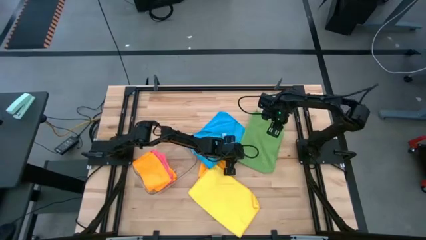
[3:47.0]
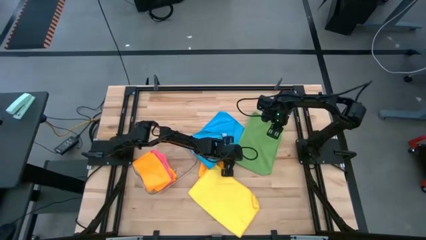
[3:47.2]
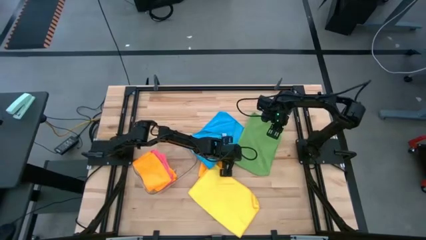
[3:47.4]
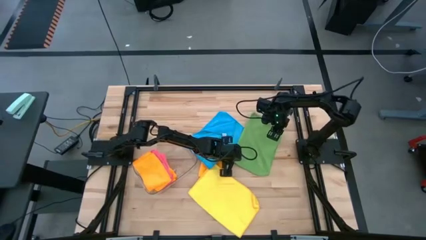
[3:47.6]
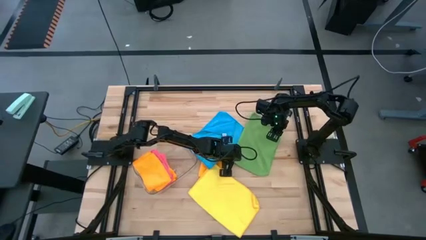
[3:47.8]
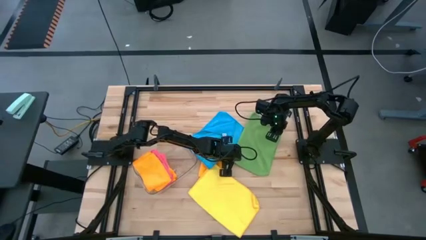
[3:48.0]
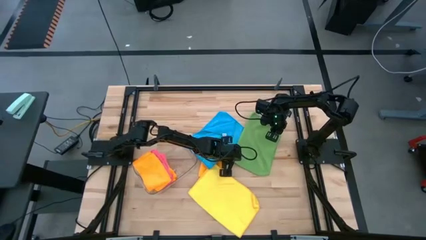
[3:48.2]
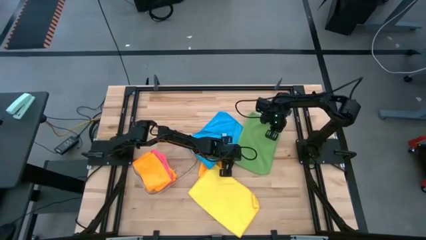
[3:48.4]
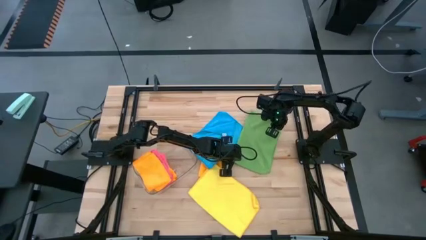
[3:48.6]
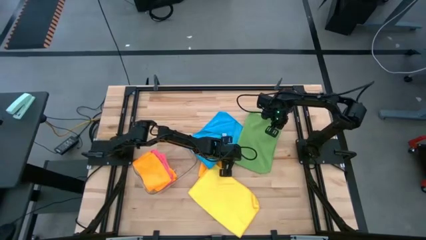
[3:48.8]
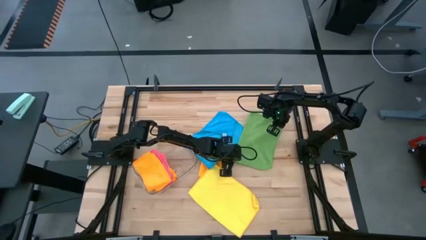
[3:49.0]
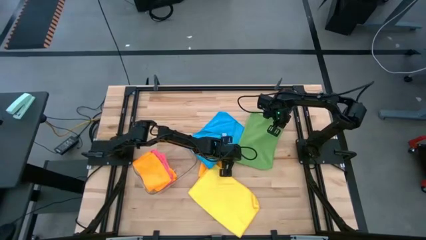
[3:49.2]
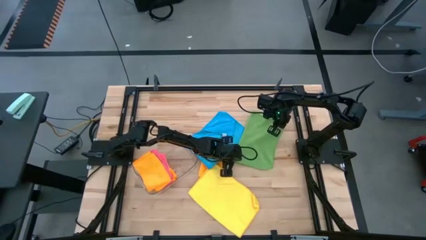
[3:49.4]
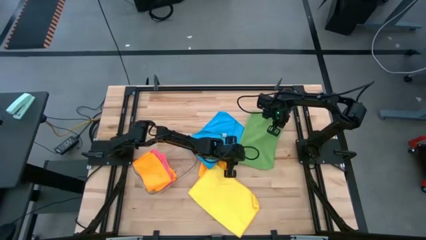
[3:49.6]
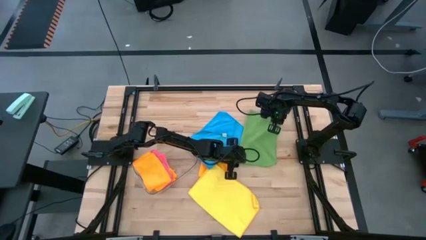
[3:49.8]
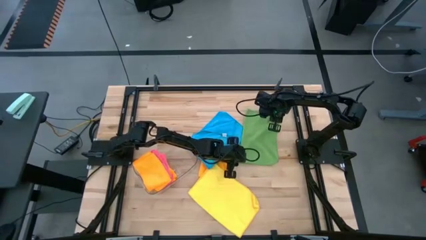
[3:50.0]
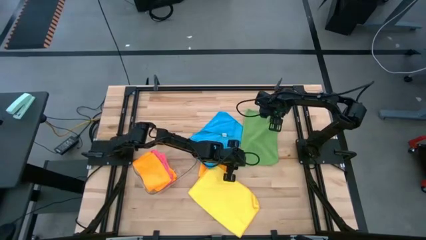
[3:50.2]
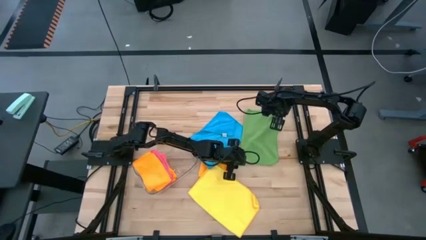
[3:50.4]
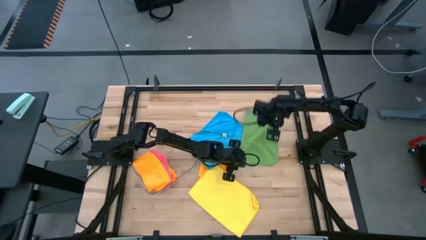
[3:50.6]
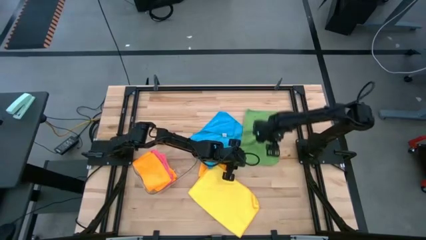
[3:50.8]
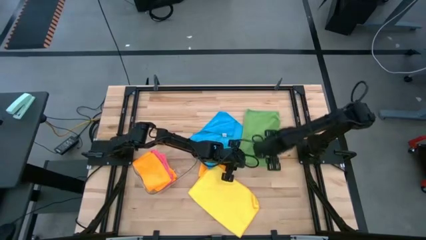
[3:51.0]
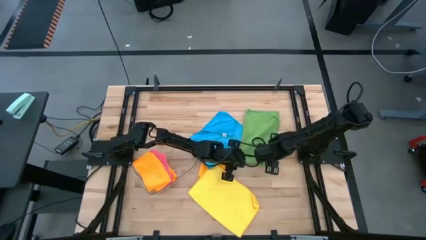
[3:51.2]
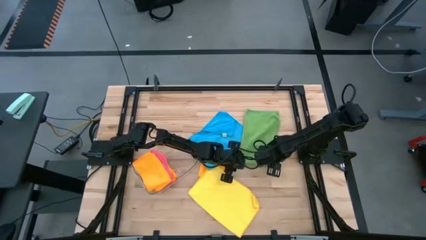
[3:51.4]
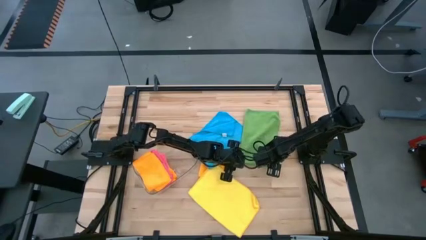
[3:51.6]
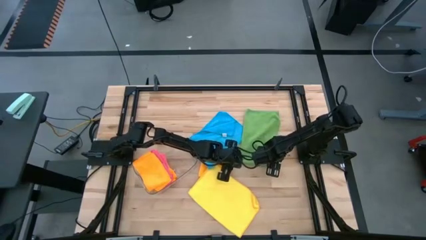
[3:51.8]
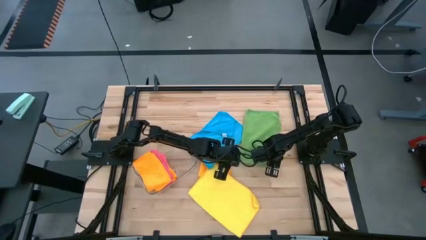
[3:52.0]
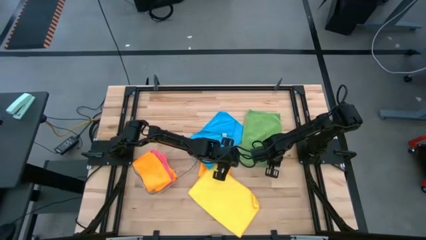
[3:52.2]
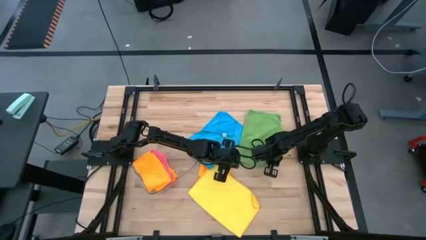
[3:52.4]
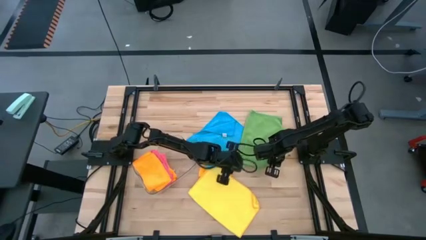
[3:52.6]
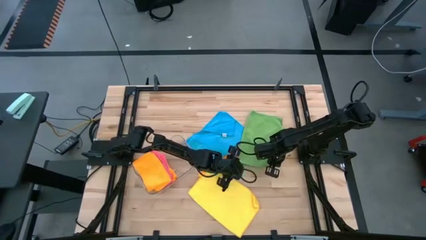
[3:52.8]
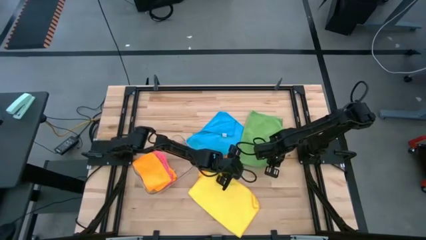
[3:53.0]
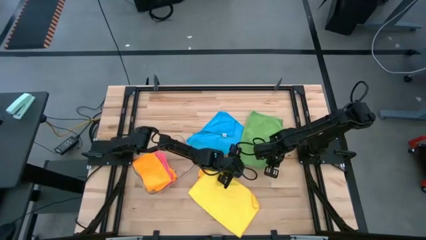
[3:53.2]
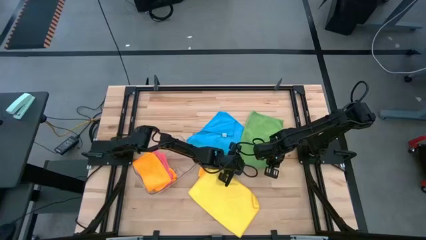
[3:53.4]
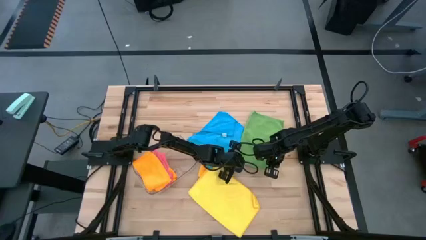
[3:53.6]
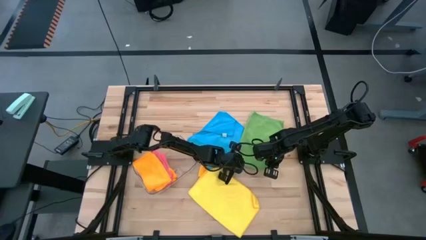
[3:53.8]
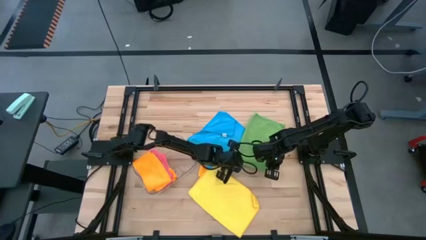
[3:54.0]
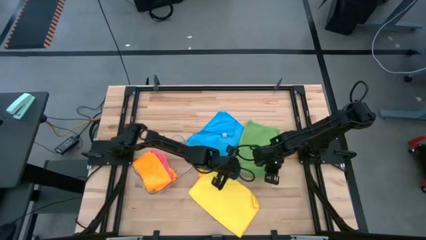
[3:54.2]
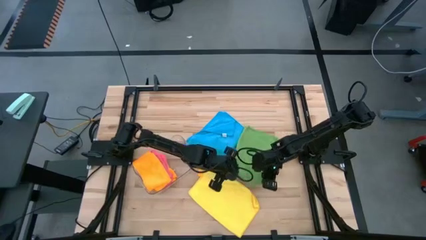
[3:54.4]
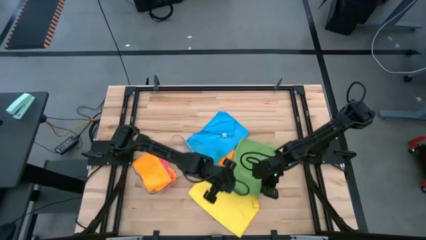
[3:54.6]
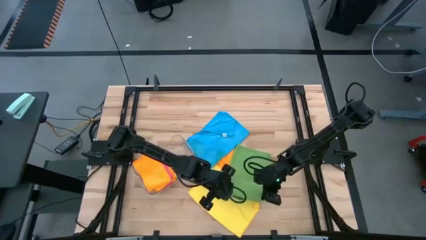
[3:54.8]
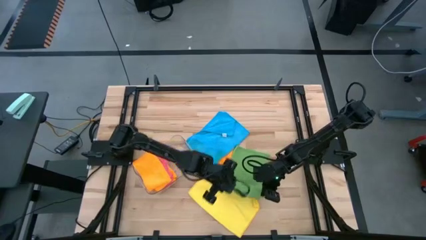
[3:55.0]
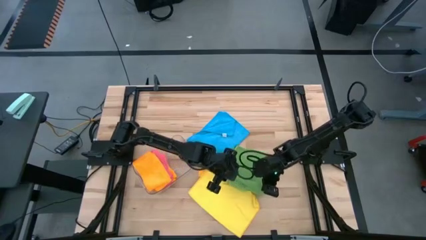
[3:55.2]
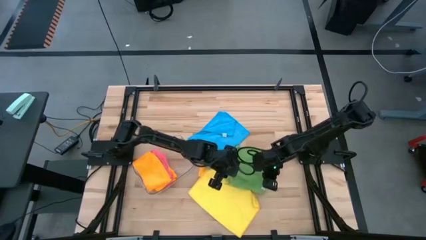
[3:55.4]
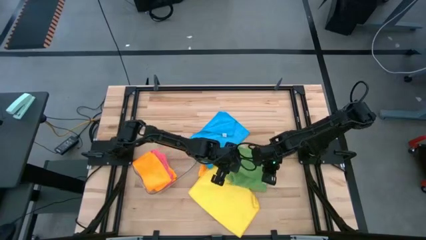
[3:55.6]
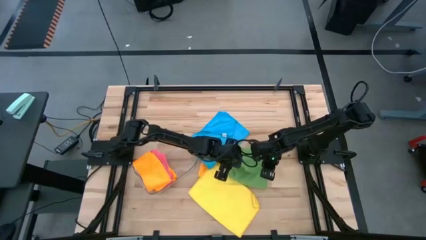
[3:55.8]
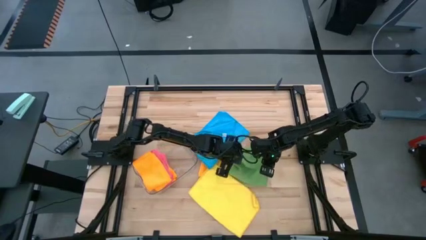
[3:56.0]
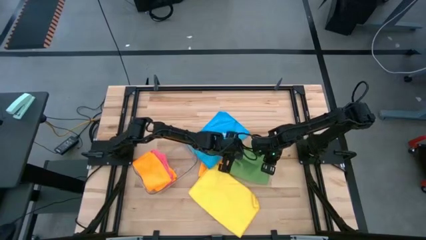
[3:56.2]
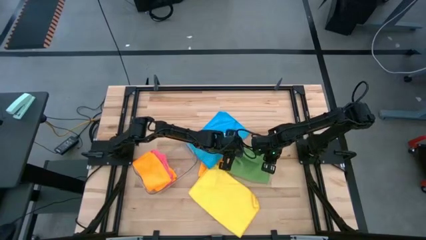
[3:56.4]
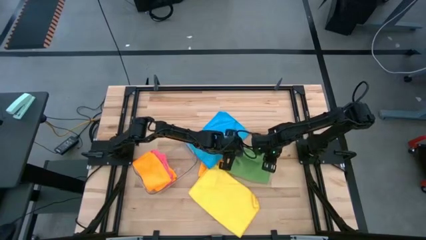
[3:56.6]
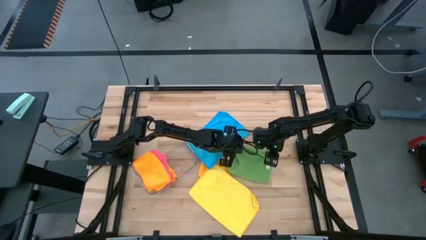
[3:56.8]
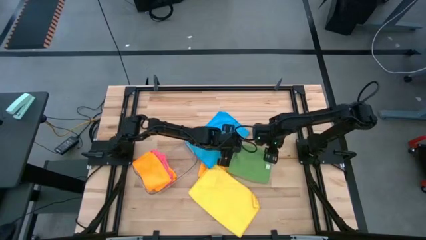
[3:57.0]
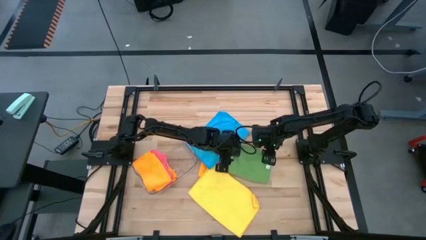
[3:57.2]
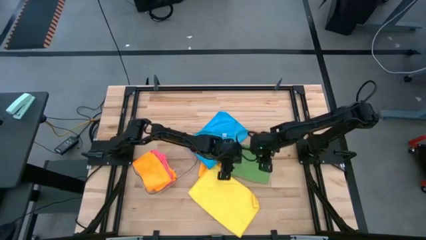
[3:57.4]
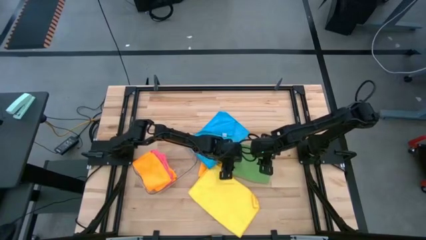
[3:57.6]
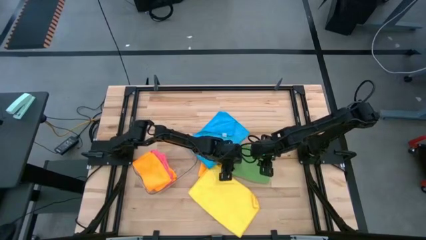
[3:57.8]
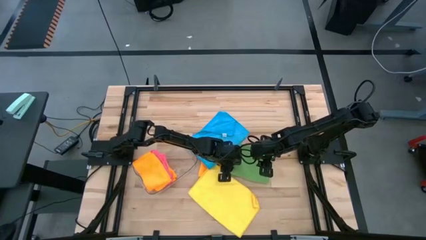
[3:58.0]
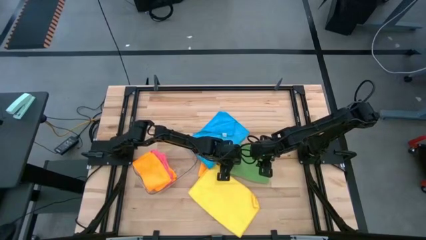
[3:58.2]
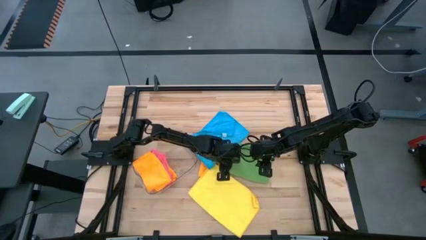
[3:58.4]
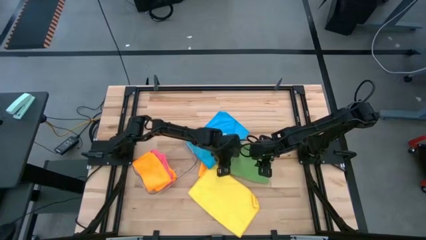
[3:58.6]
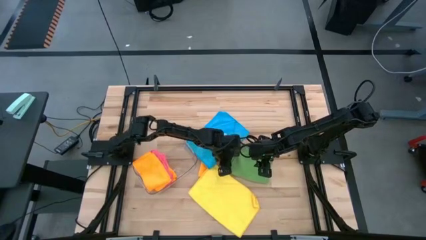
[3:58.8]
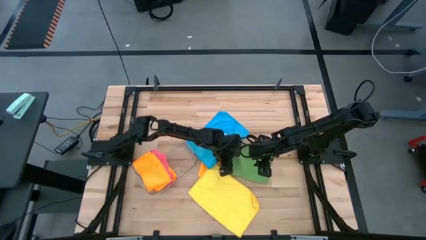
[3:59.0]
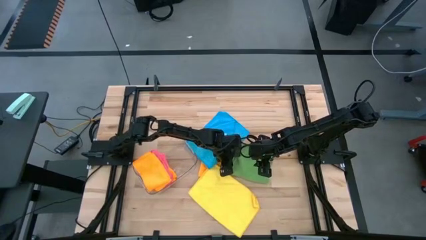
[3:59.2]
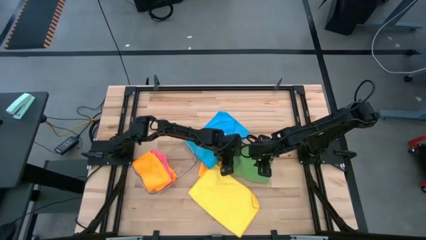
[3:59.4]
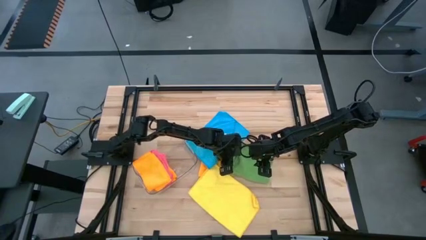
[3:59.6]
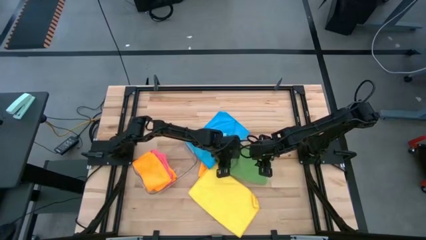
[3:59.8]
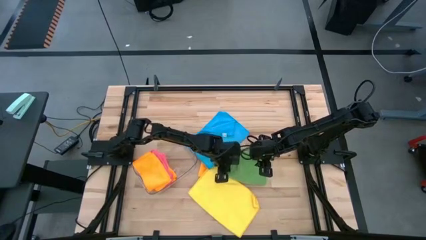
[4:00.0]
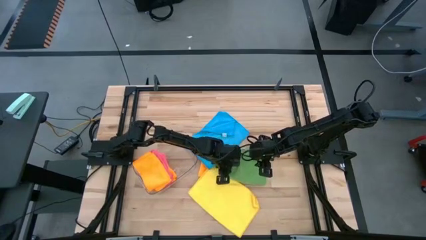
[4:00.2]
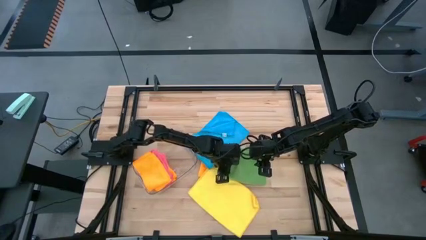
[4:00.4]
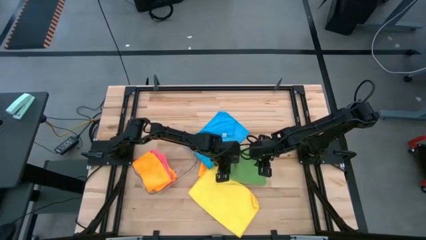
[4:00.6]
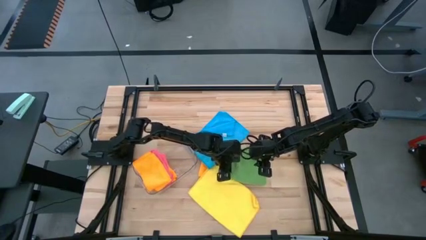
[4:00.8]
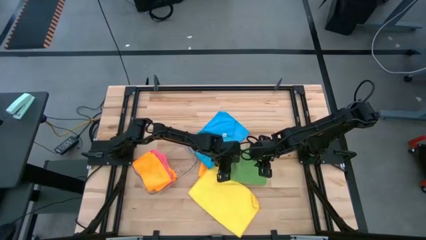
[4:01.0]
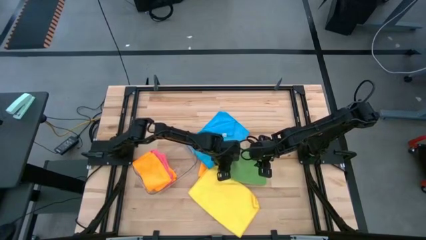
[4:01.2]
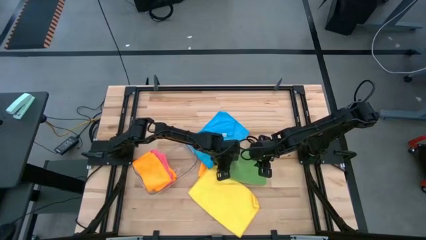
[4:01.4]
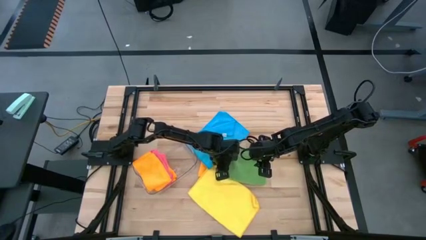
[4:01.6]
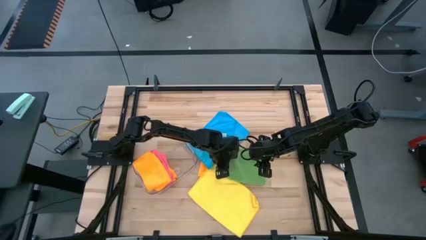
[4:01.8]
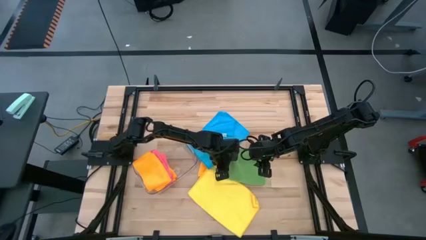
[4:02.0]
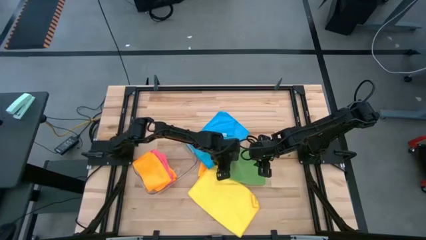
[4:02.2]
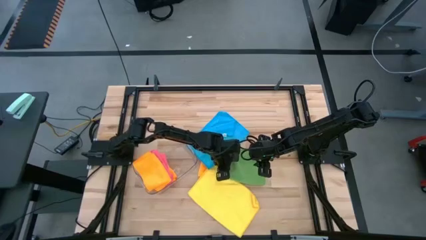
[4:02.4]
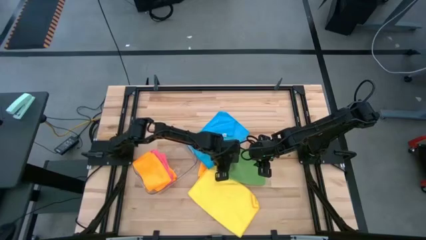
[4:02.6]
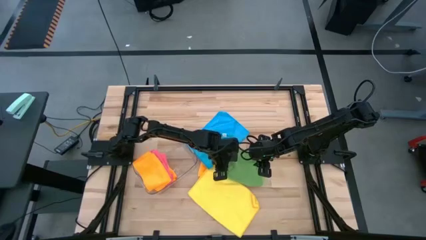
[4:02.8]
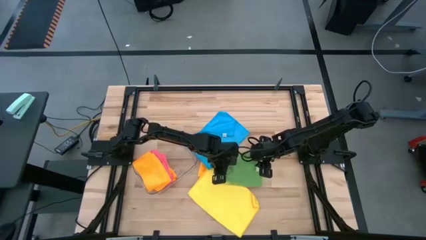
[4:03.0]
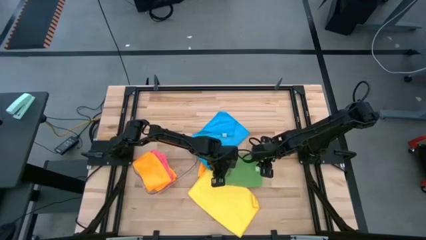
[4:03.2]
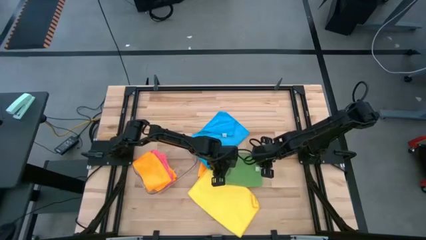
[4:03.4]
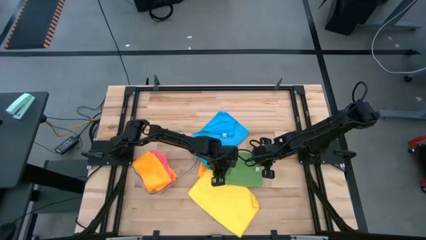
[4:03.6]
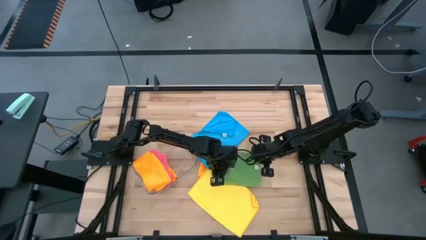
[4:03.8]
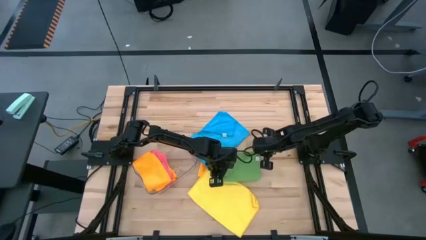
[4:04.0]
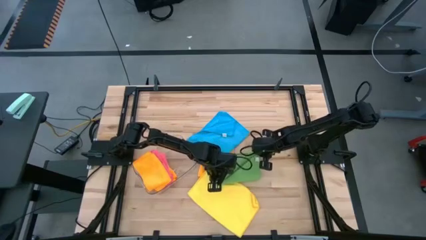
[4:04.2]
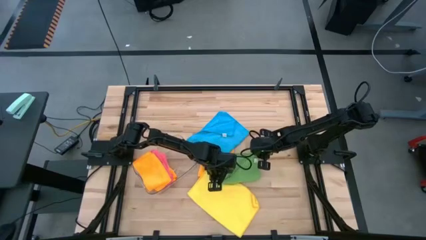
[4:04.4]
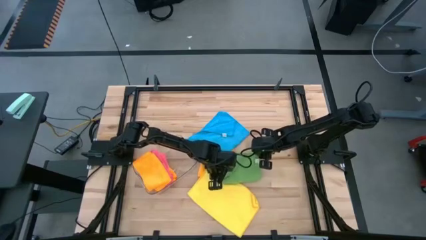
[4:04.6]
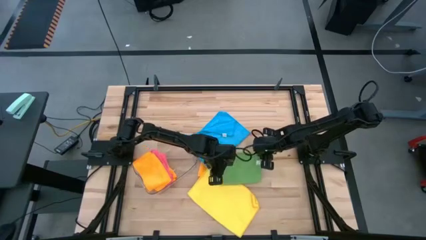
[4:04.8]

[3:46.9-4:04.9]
Task: Fold microfiber towels
Fold the green microfiber cloth
